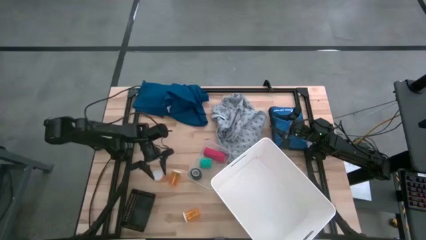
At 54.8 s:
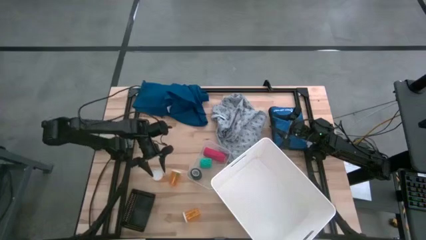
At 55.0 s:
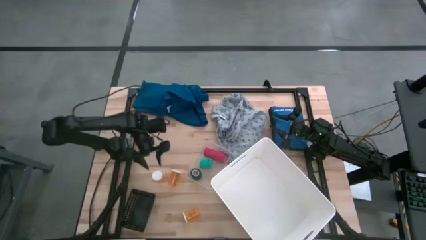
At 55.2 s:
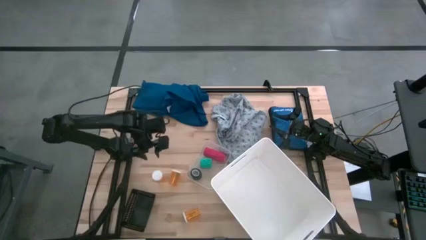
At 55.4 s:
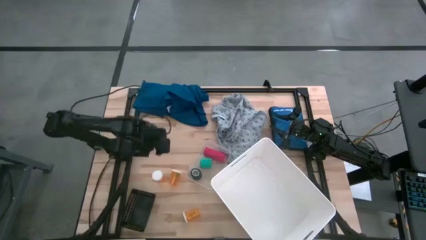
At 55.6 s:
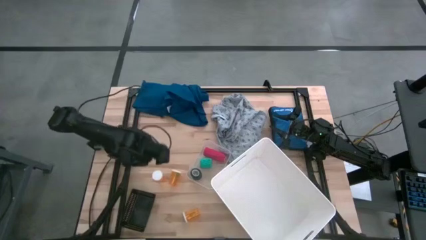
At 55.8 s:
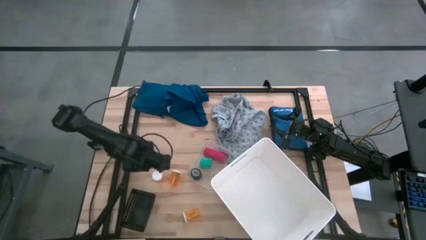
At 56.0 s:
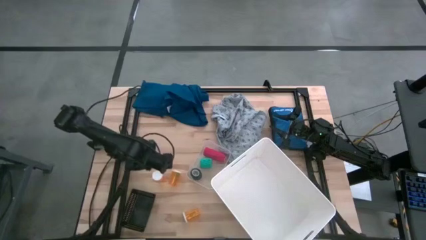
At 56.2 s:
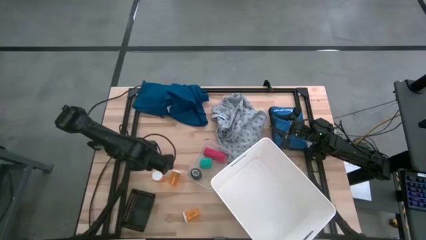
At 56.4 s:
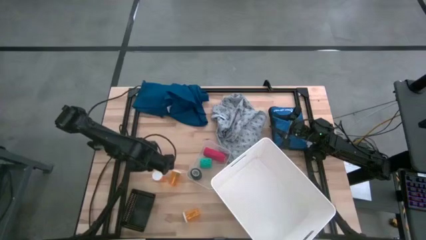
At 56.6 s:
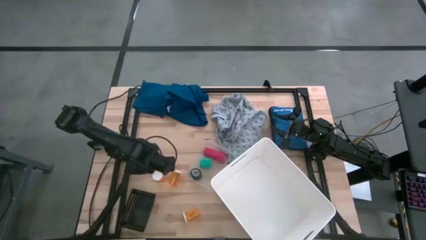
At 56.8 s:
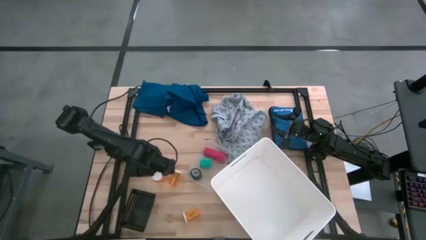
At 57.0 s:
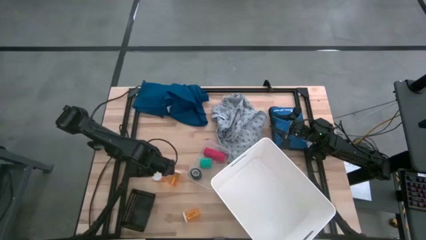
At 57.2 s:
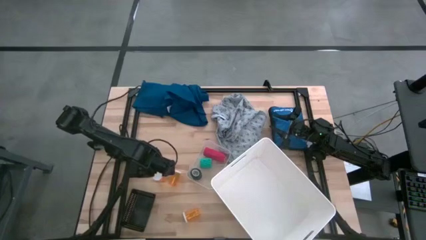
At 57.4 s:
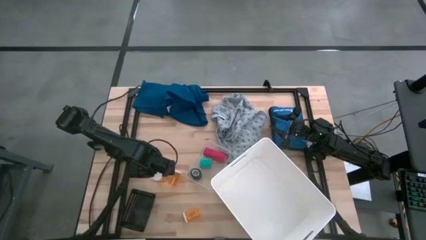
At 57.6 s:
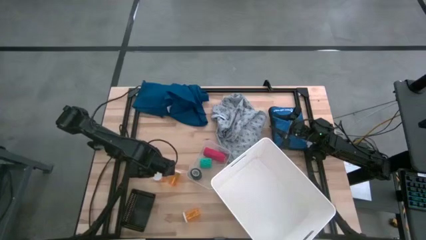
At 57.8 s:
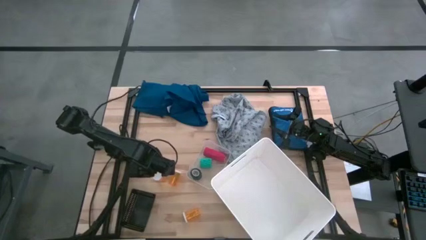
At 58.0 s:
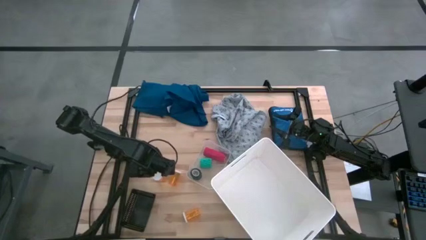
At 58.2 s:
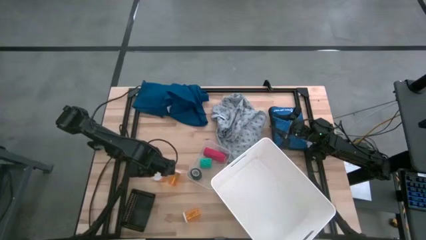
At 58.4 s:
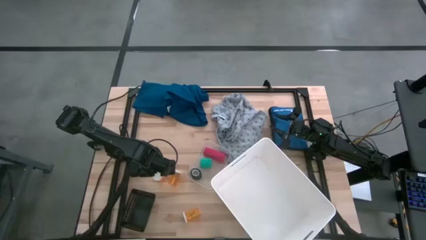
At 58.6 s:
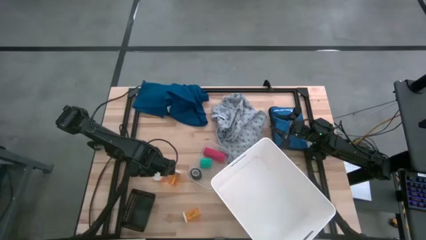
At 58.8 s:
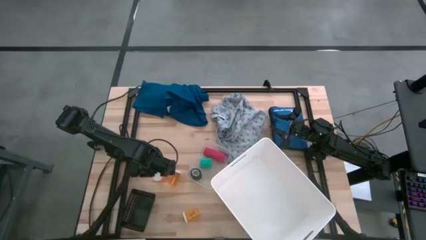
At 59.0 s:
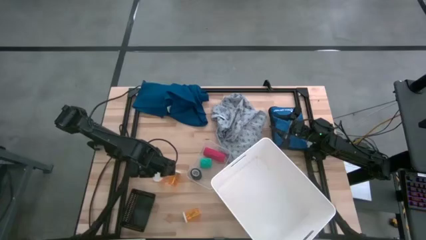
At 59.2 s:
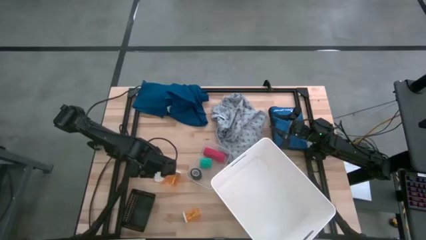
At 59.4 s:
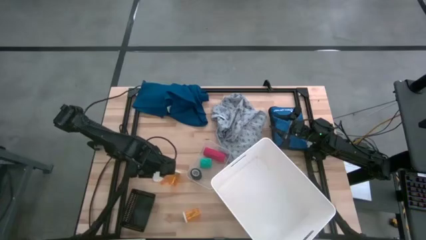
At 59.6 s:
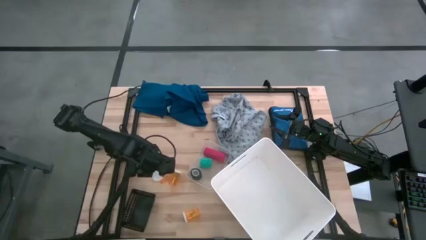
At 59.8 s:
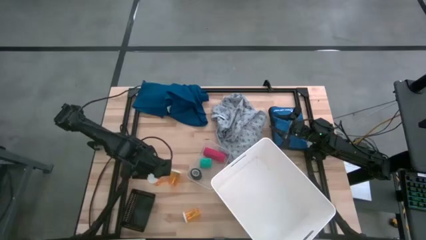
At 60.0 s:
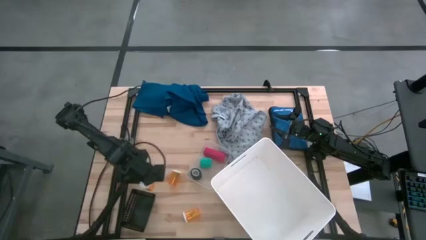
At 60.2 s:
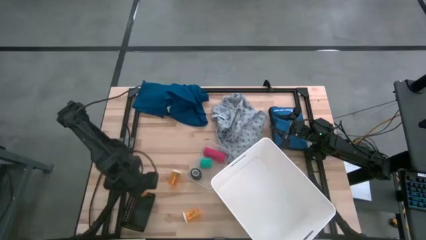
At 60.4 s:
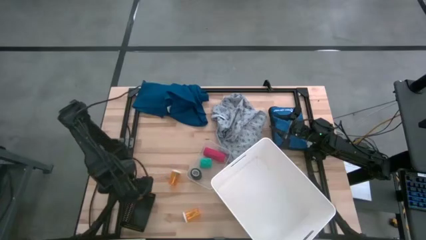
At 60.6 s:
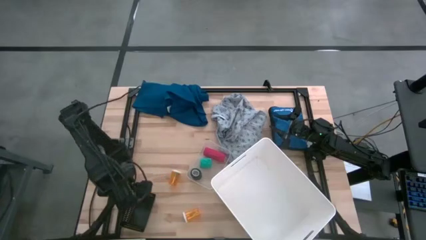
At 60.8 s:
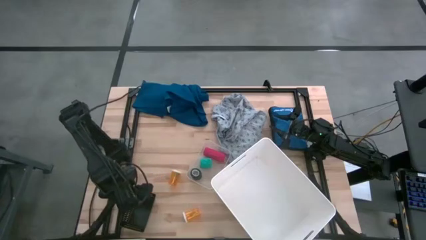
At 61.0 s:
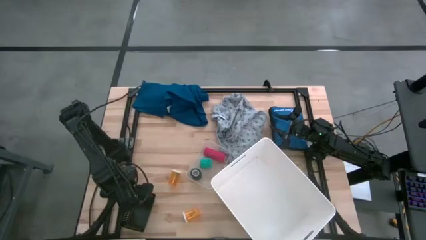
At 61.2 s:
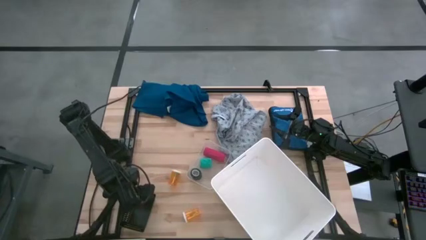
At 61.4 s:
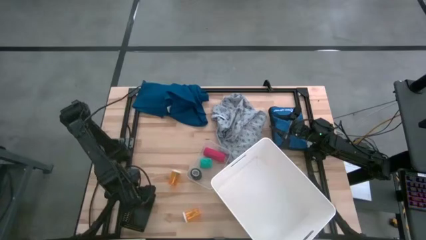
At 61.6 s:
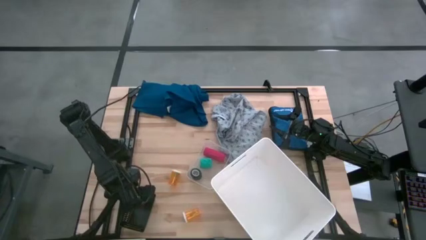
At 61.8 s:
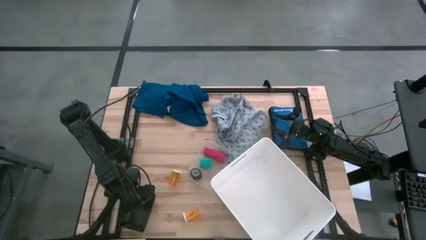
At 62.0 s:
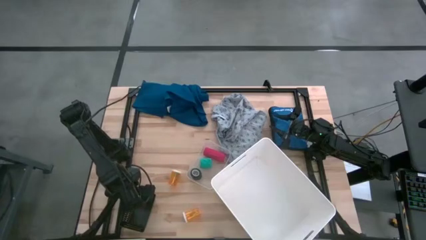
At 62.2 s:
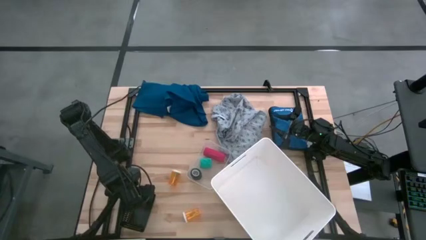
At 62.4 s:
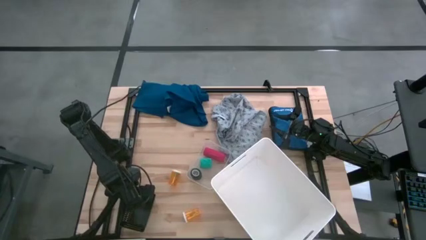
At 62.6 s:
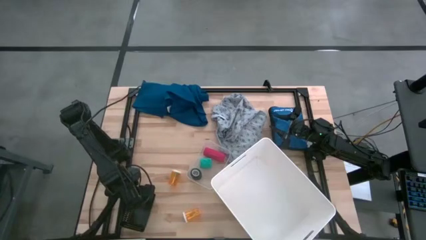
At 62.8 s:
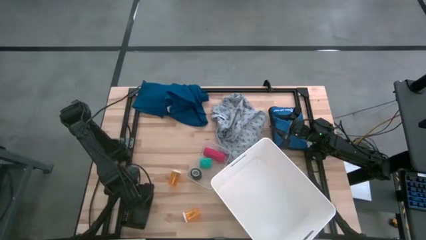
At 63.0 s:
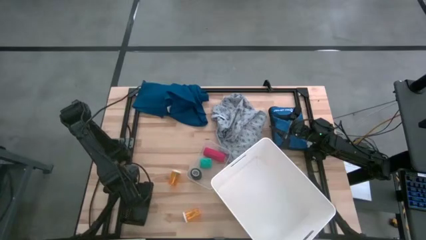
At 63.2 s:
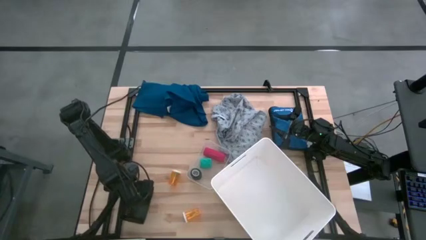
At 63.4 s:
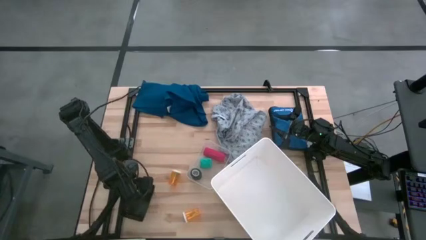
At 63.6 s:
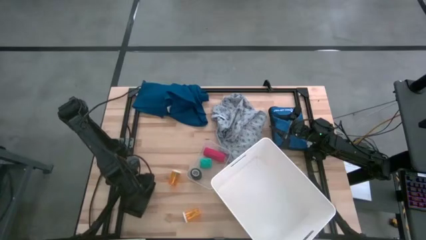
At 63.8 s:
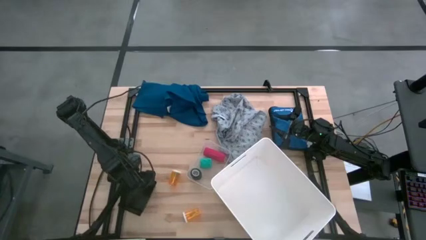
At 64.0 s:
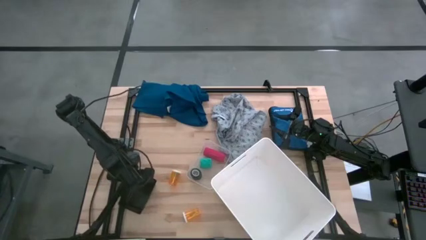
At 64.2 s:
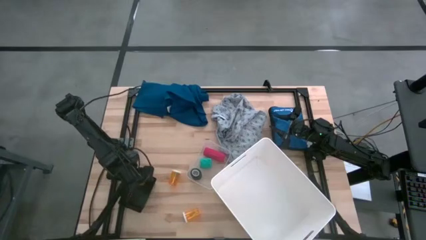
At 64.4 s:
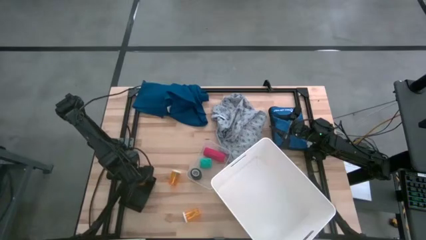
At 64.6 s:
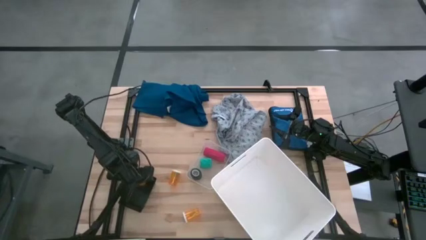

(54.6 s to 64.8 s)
Task: Pick & Place Medicine items
Put the top left orange medicine bottle into the black bin

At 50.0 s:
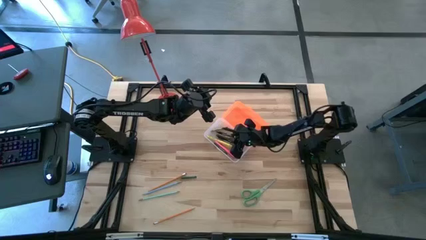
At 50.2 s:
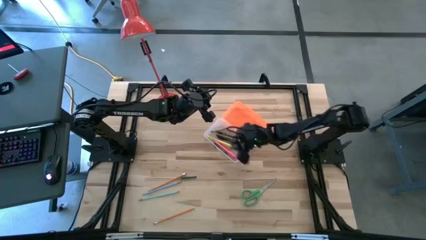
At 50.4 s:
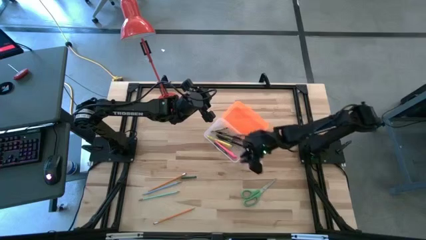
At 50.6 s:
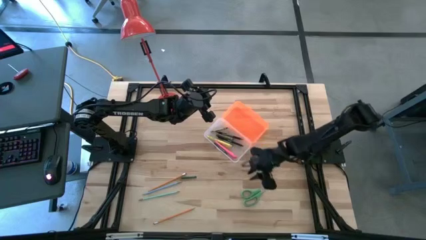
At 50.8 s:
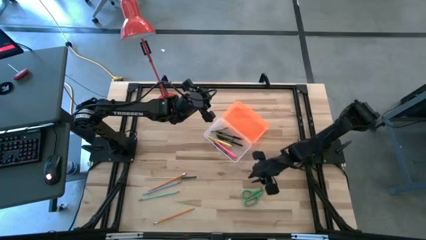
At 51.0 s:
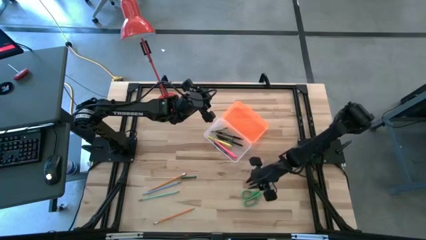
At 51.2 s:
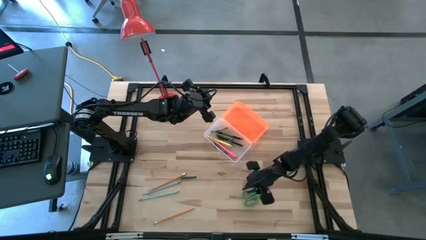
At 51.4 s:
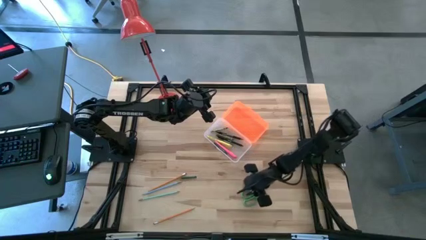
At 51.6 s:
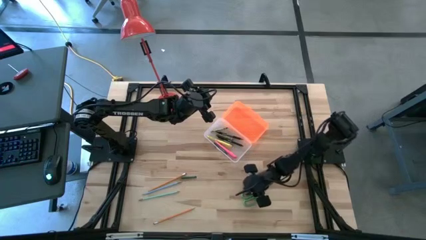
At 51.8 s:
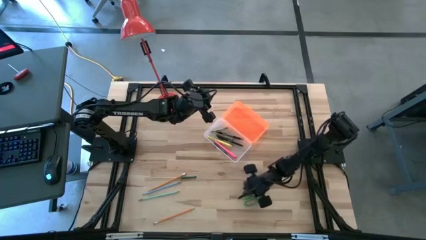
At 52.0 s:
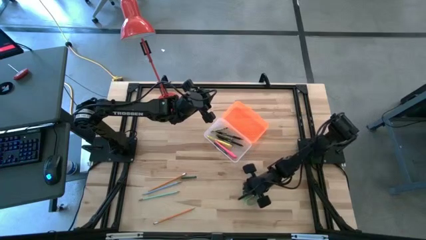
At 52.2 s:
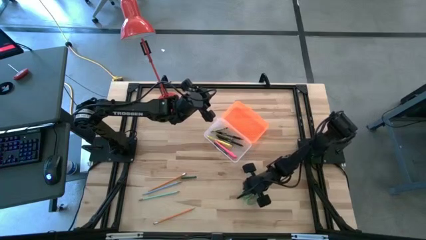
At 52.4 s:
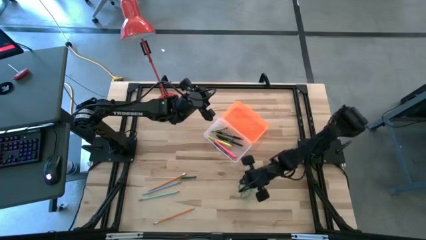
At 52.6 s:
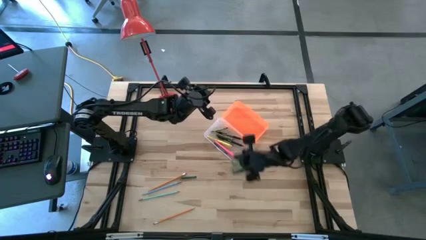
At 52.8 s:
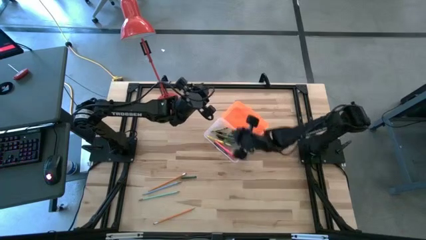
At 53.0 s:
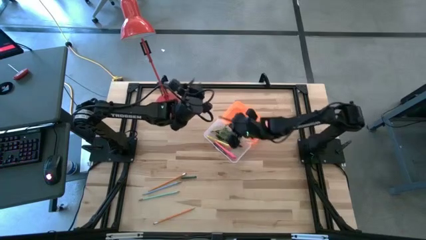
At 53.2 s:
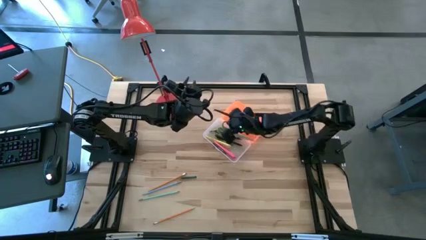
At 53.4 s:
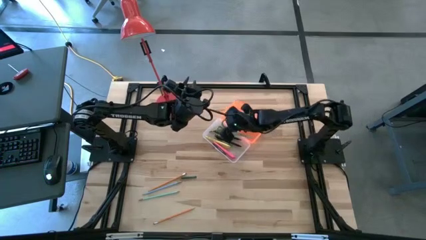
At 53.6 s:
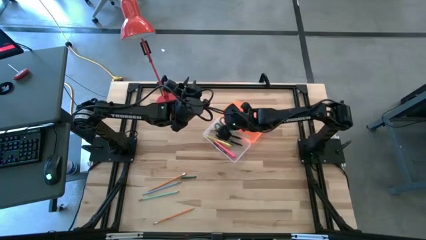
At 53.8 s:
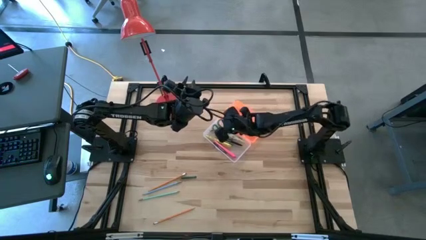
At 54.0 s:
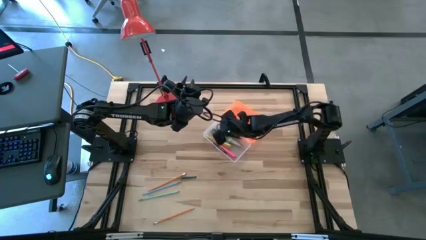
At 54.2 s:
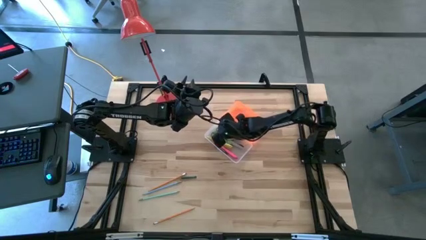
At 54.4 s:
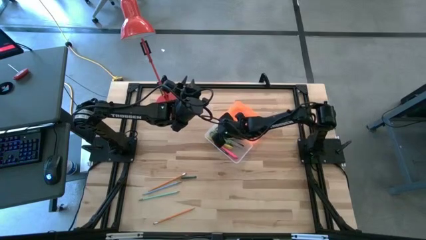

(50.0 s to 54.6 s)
Task: Pick & place school supplies into a supply box
Put the scissors into the supply box

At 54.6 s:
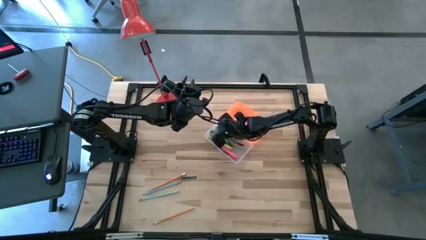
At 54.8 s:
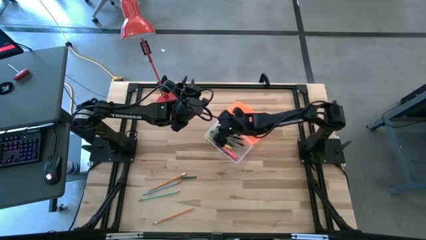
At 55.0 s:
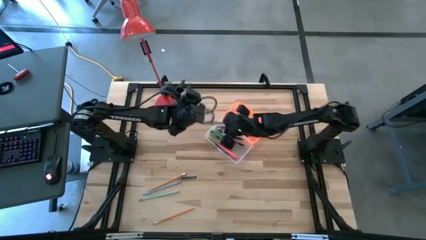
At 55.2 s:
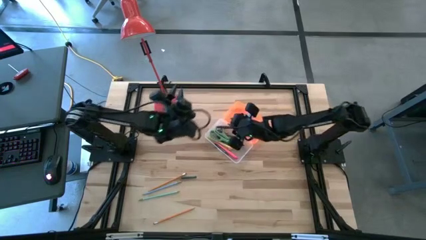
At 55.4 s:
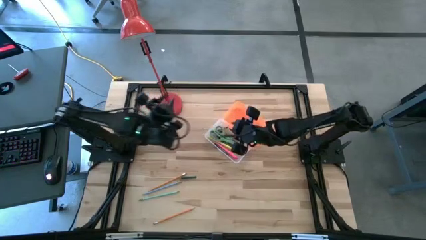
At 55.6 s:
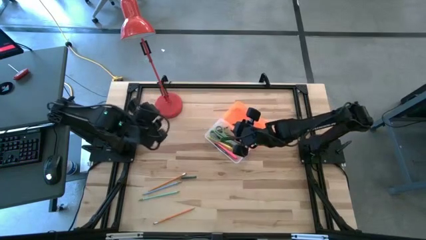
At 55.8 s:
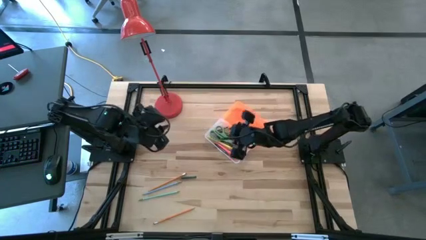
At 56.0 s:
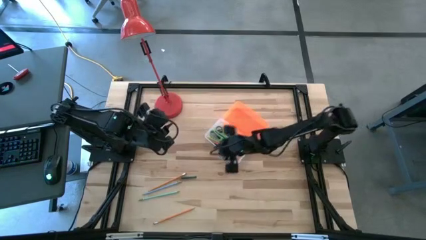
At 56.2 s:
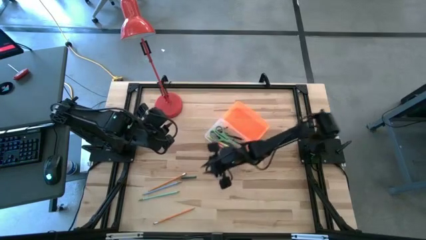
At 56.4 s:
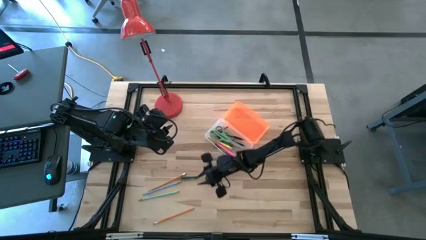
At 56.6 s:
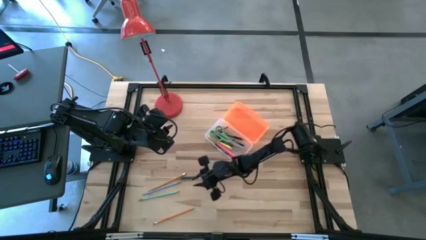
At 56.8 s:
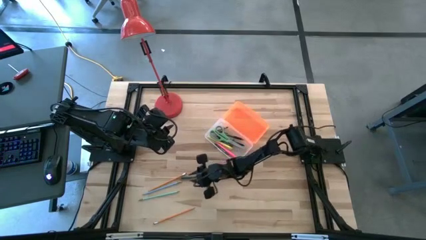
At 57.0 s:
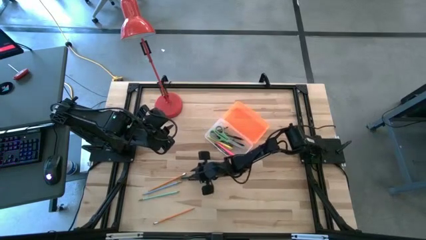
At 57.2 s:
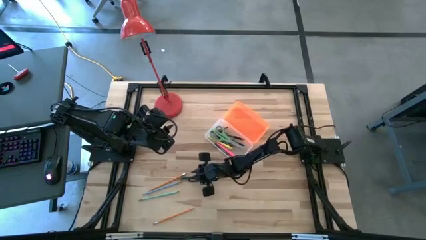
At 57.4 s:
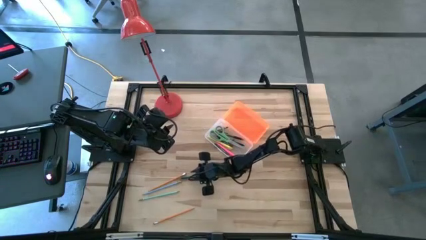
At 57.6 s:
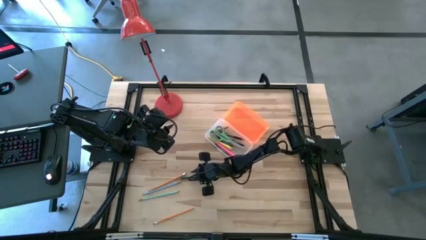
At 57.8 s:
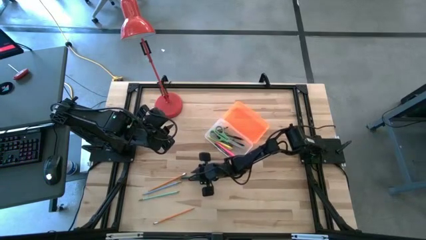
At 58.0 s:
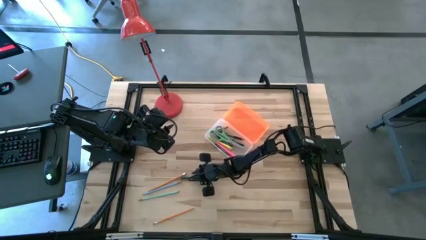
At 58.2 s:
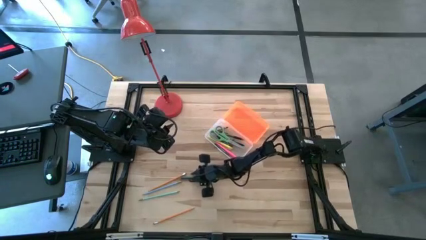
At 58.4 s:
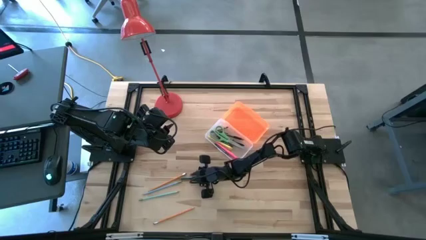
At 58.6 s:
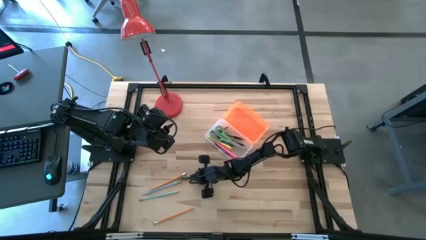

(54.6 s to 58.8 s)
Put the green crayon into the supply box
